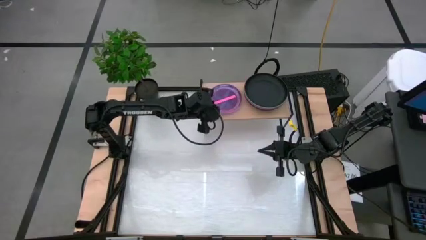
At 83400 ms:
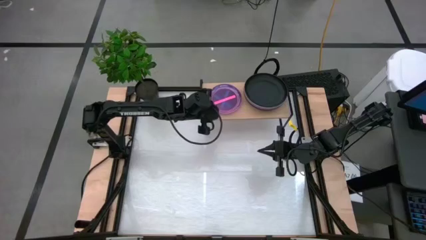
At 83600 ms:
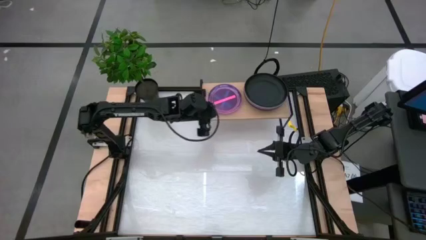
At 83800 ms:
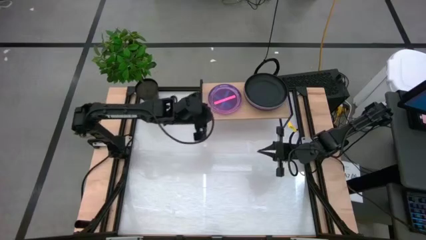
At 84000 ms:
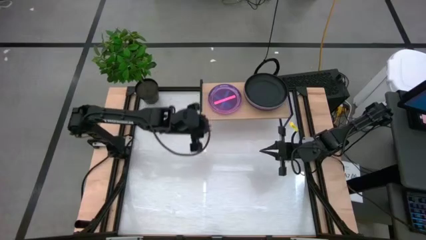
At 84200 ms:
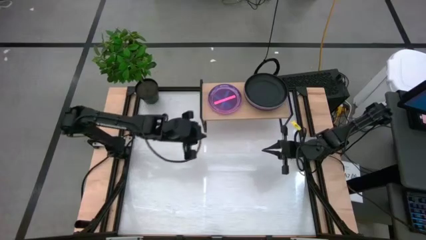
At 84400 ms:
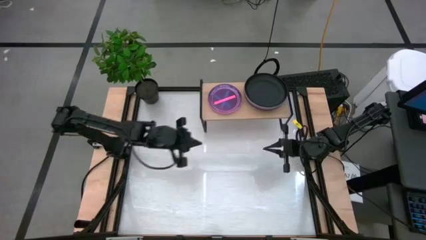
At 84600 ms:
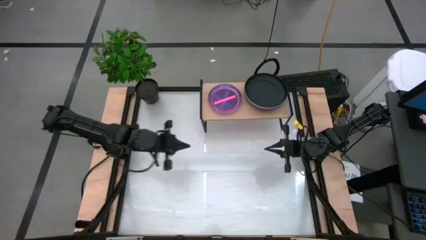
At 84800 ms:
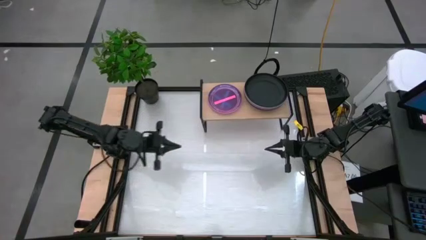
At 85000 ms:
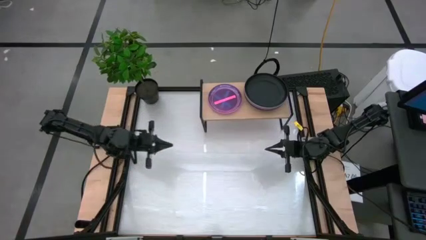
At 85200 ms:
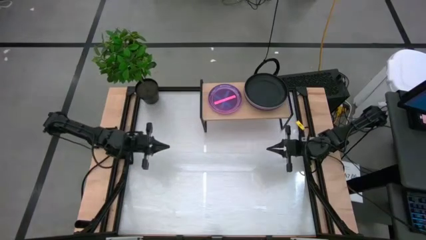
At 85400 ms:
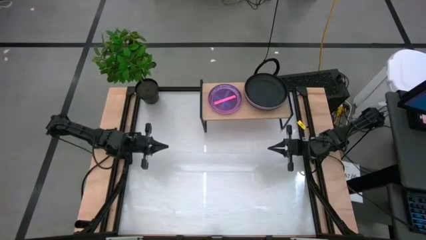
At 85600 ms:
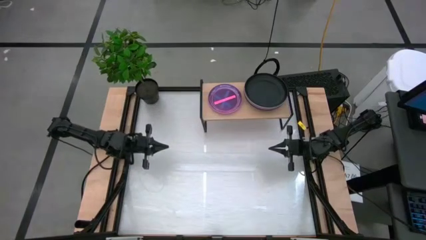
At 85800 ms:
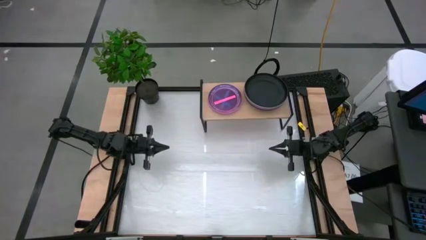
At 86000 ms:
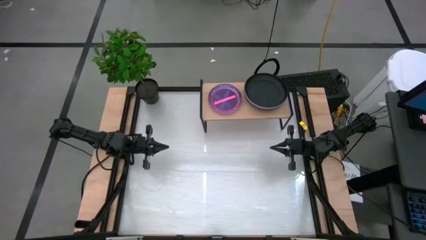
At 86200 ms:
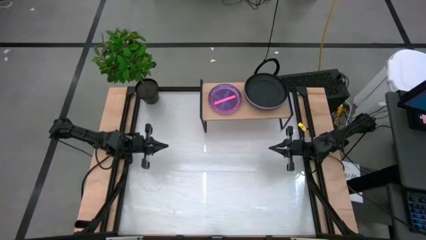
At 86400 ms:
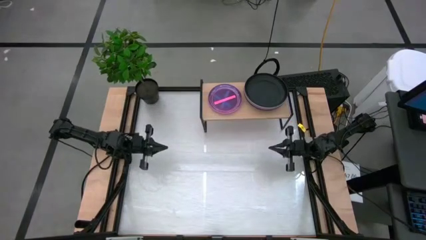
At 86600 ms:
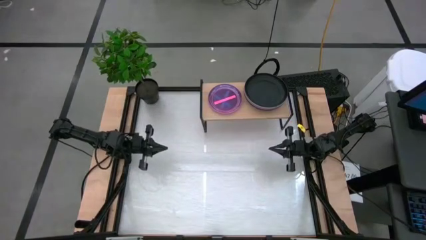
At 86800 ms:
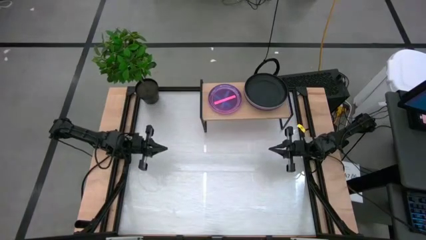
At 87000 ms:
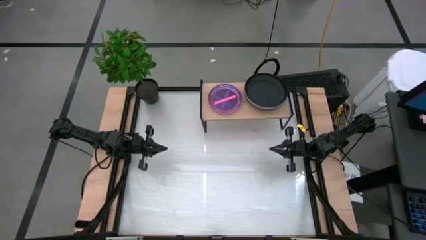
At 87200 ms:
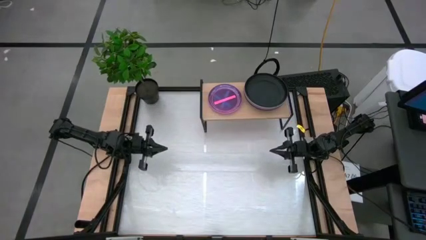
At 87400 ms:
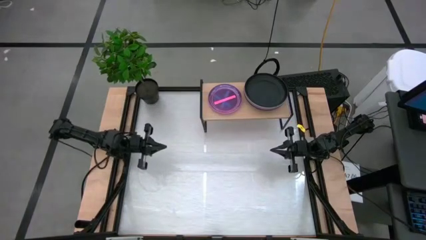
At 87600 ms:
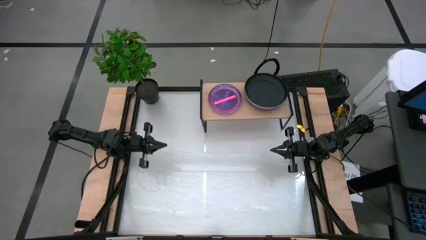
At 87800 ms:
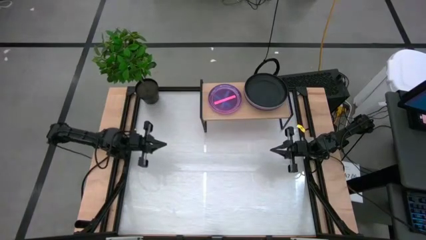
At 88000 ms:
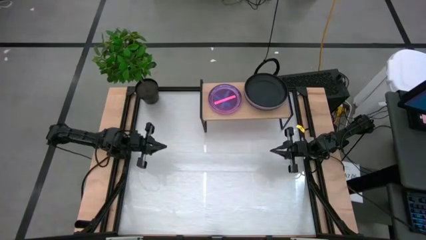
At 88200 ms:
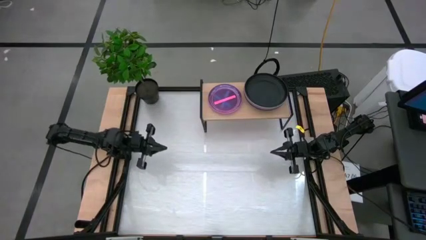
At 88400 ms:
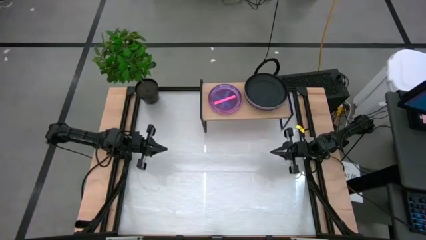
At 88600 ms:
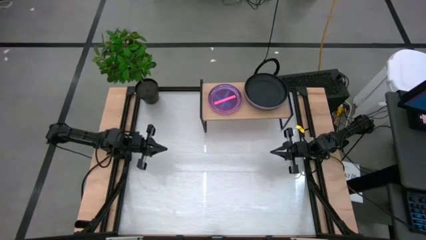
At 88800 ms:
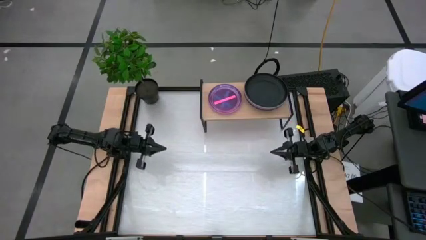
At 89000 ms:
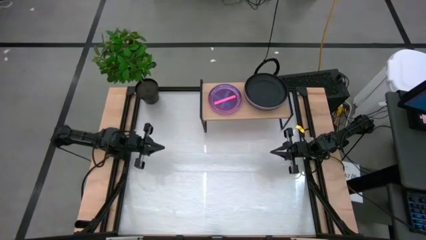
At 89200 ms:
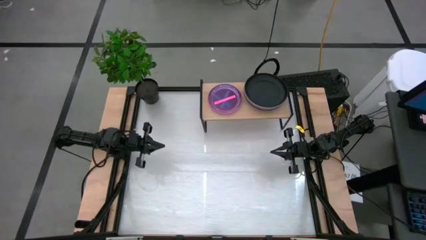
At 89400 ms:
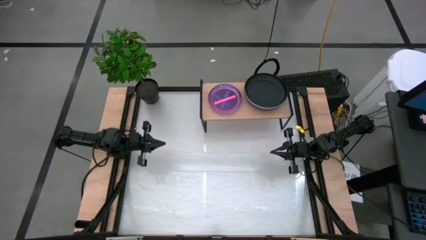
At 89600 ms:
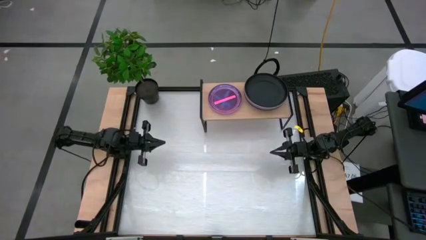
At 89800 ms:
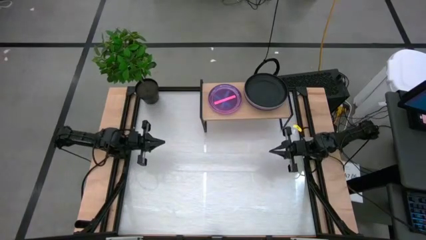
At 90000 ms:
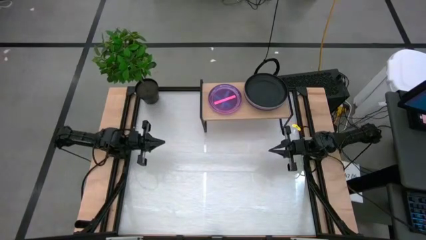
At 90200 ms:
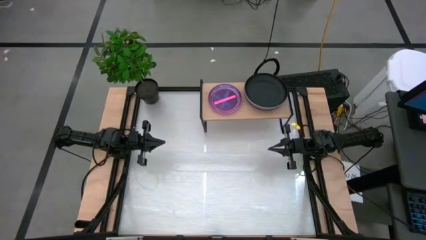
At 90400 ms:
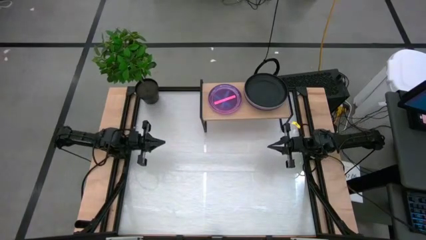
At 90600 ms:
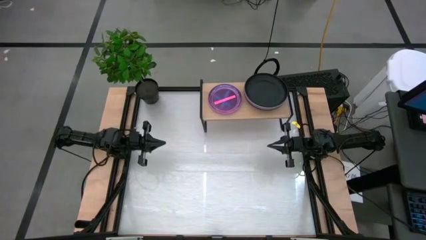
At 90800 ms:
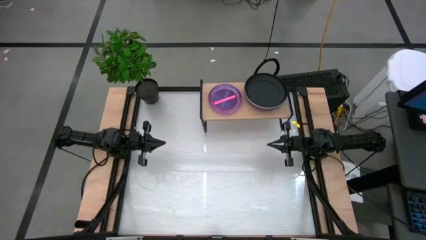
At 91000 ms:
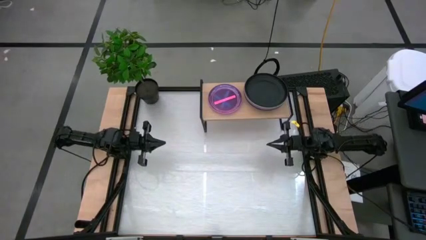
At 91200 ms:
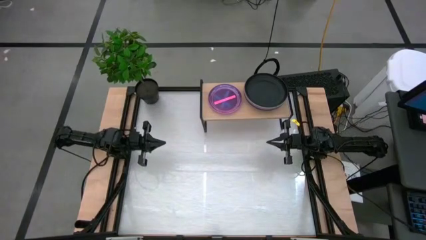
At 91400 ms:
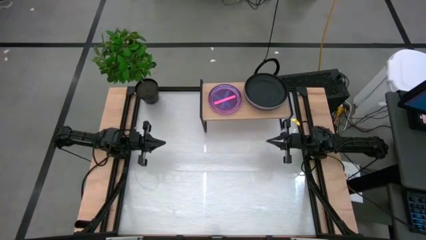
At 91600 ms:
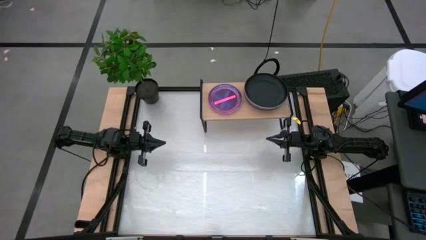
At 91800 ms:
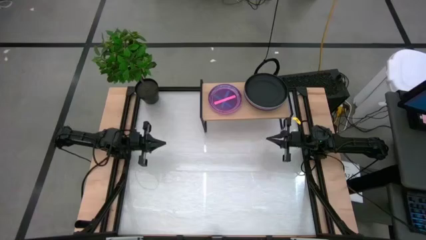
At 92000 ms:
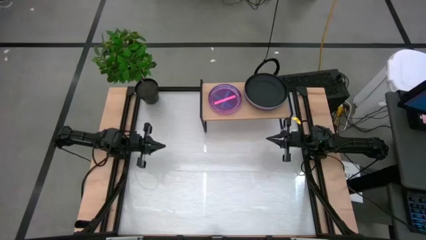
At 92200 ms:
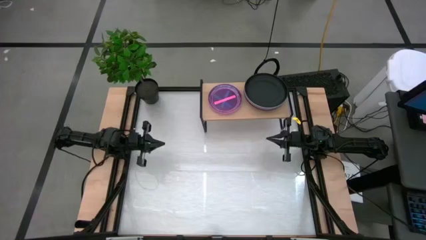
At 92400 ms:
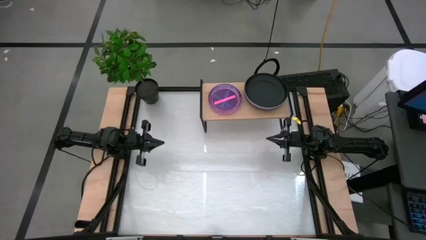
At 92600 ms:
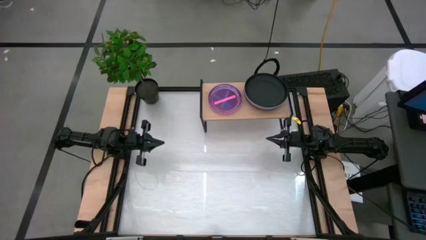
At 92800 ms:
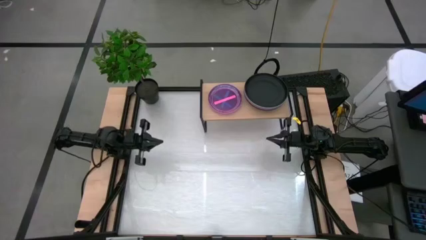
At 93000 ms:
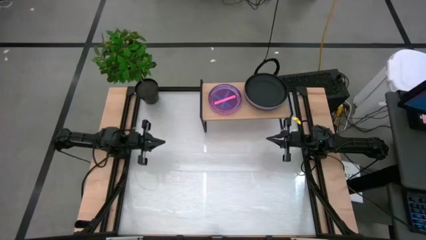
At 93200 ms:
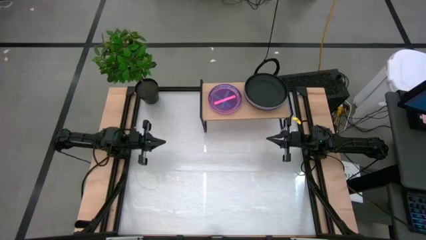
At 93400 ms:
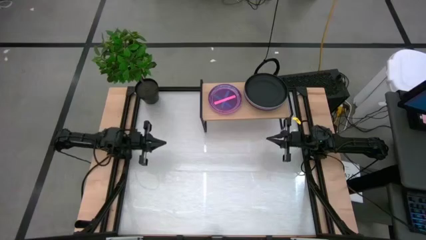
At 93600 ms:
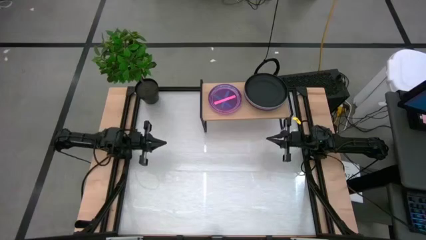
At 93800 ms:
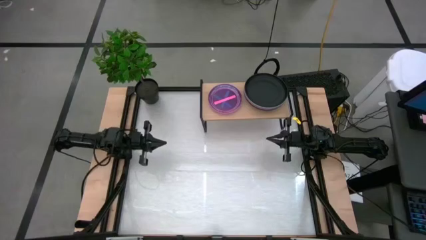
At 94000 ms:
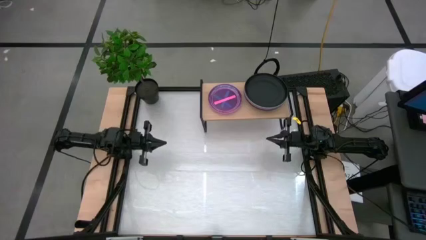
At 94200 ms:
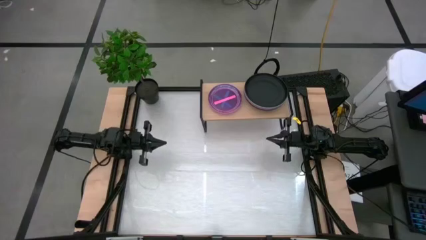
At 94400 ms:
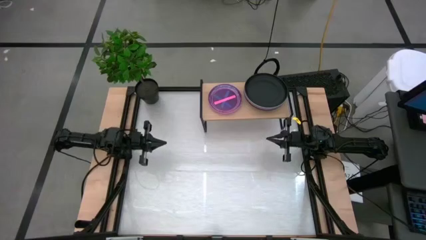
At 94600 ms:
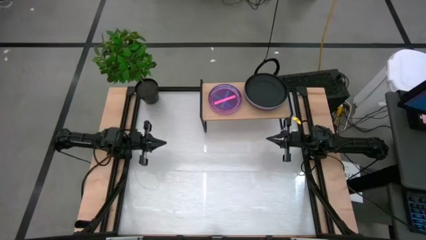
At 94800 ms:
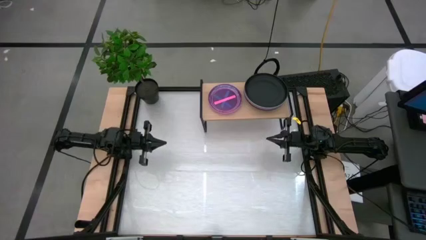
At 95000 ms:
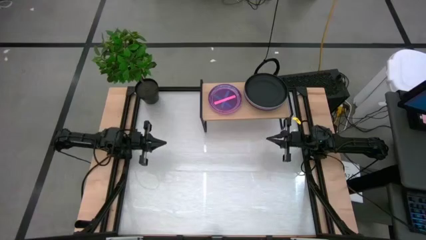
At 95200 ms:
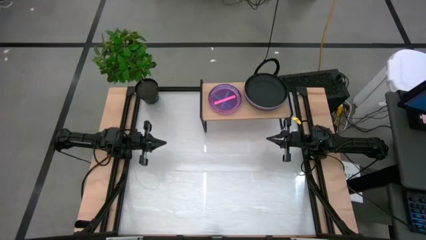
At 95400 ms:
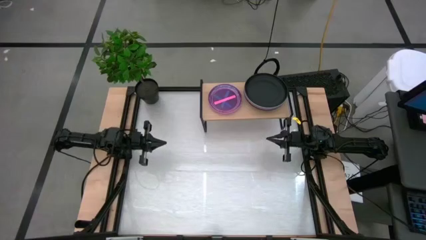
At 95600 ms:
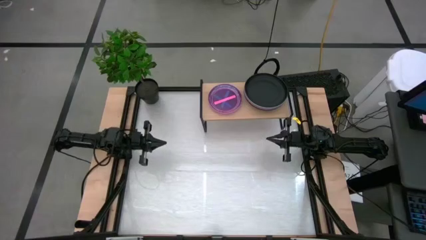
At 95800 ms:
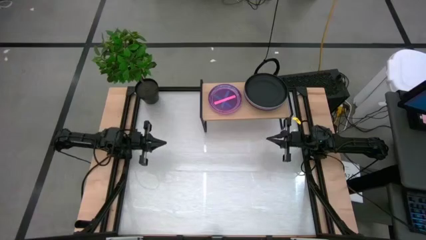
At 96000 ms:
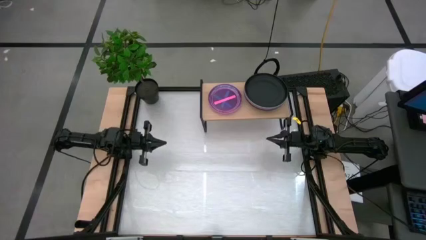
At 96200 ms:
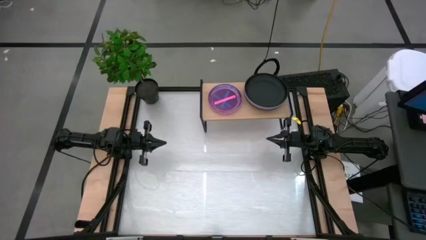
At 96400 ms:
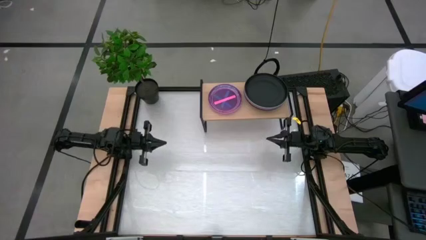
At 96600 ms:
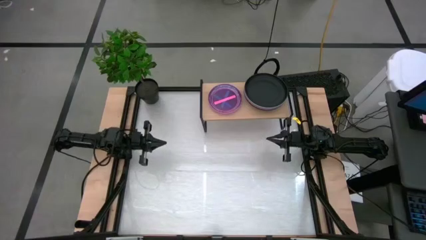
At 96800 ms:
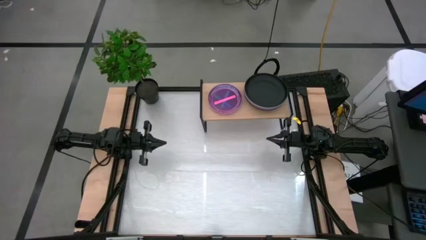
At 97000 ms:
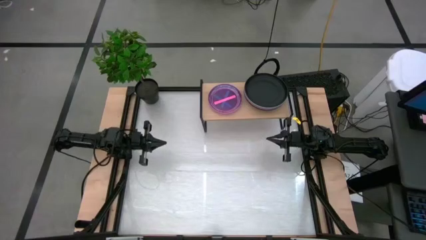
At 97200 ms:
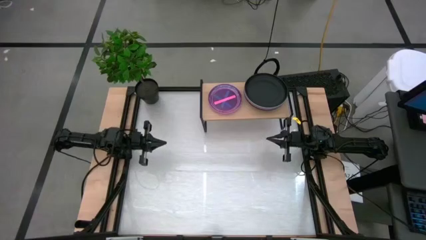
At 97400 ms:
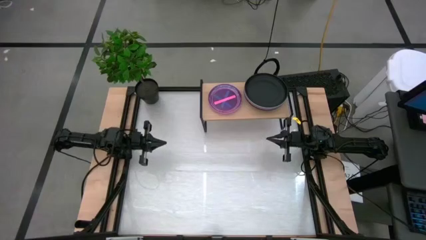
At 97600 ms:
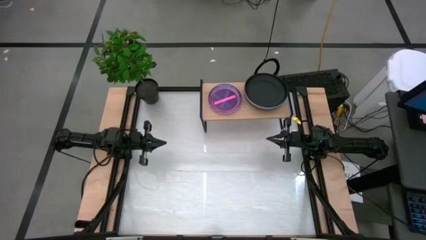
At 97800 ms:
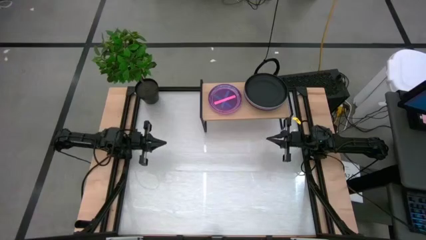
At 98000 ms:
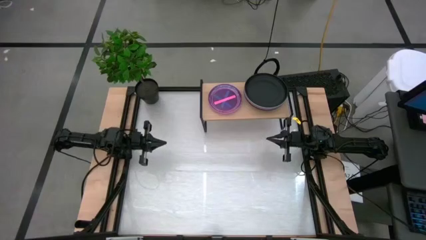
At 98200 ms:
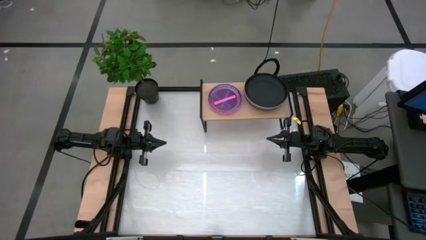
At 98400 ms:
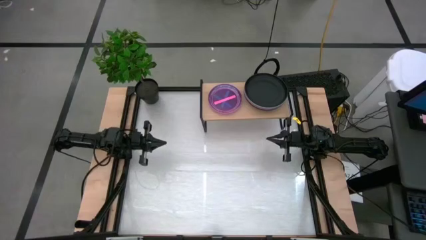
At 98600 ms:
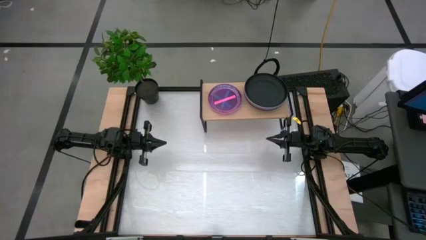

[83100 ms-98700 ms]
Task: Place and stack plates onto a shelf
Return to Home Position
